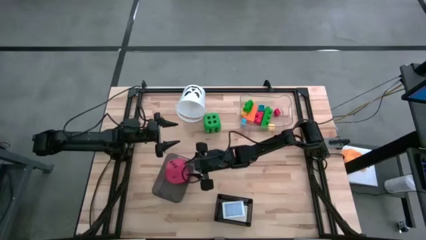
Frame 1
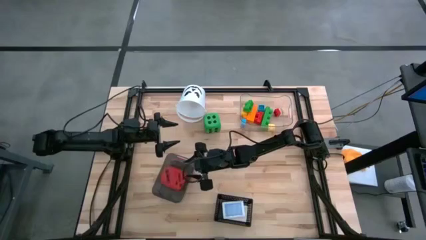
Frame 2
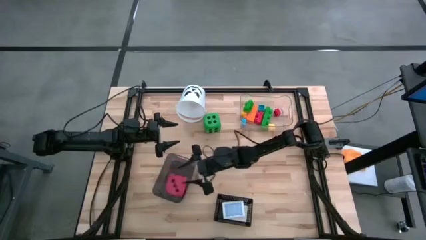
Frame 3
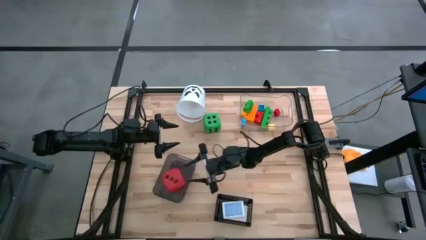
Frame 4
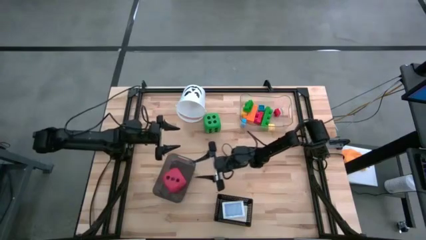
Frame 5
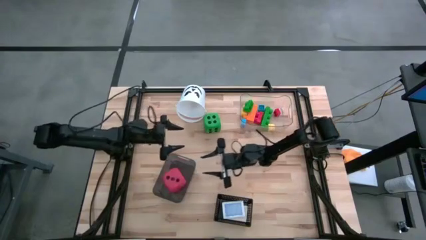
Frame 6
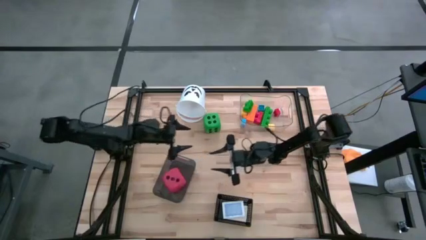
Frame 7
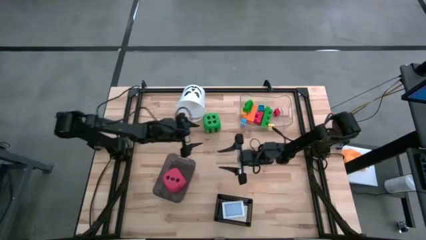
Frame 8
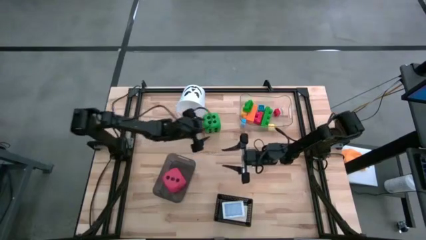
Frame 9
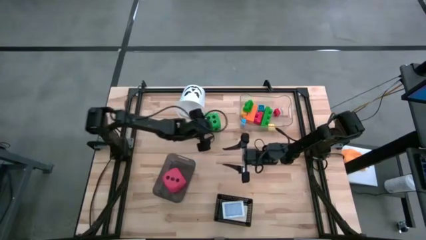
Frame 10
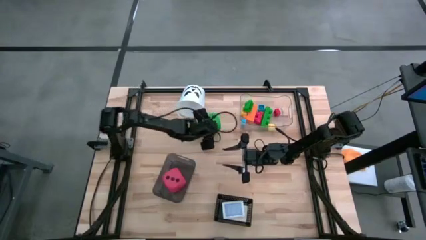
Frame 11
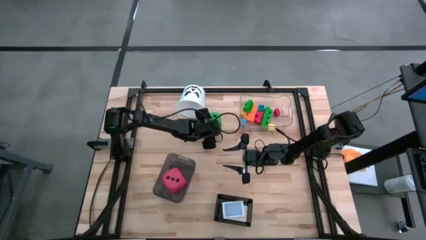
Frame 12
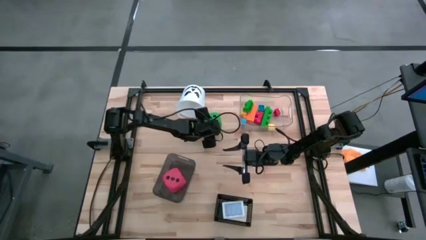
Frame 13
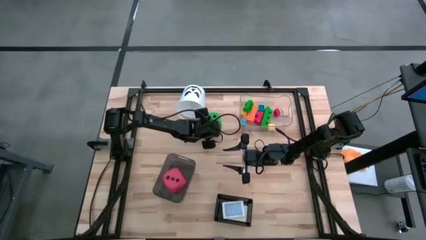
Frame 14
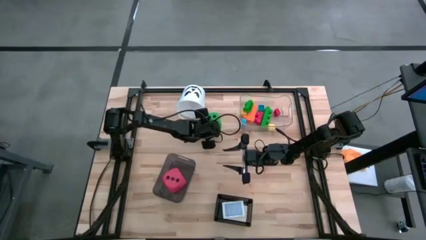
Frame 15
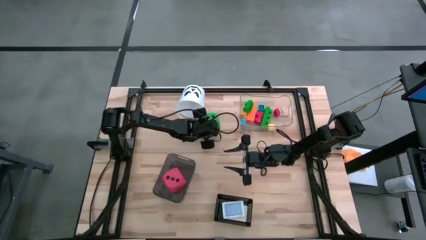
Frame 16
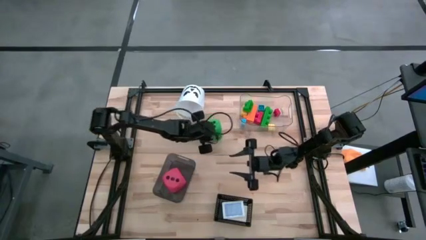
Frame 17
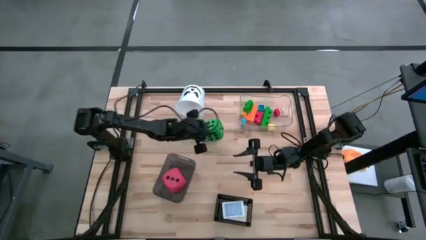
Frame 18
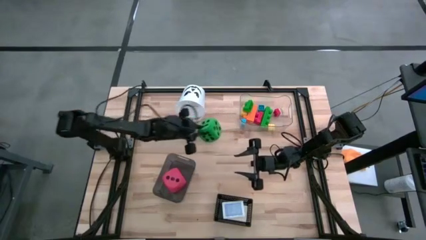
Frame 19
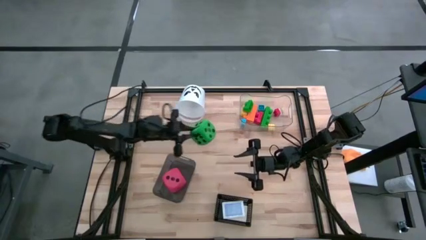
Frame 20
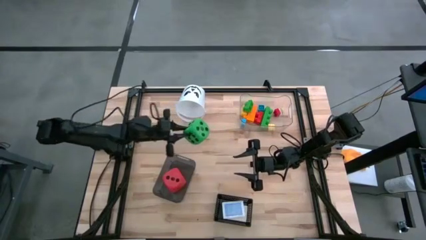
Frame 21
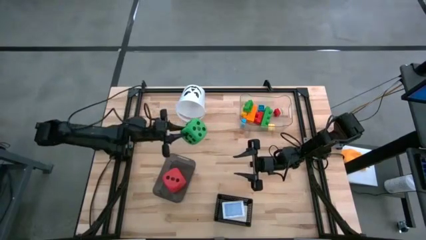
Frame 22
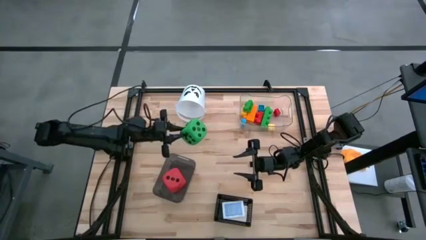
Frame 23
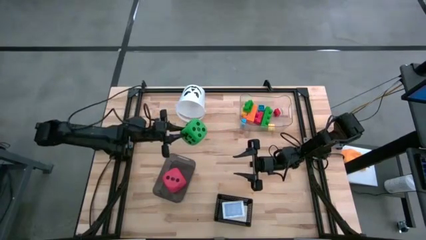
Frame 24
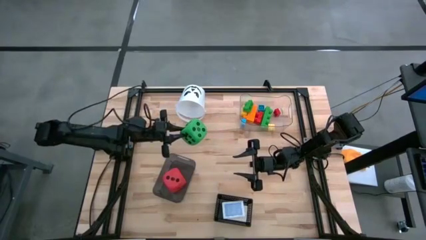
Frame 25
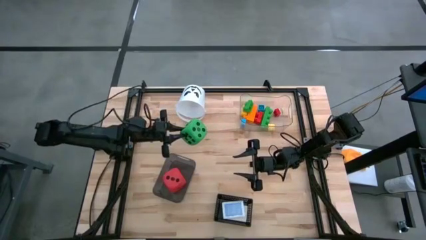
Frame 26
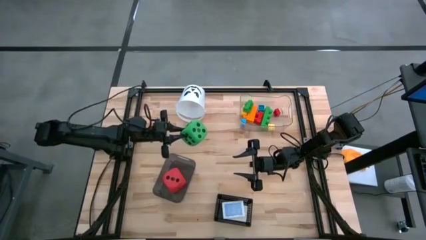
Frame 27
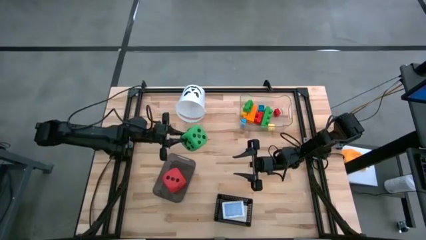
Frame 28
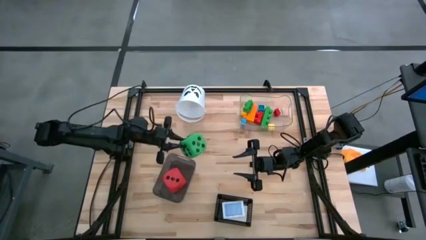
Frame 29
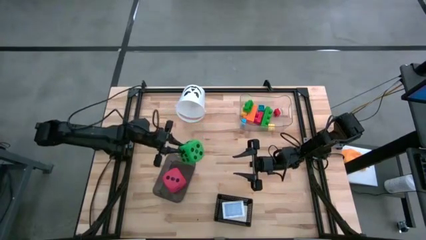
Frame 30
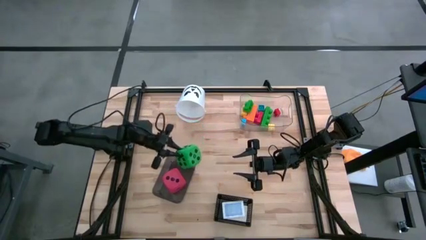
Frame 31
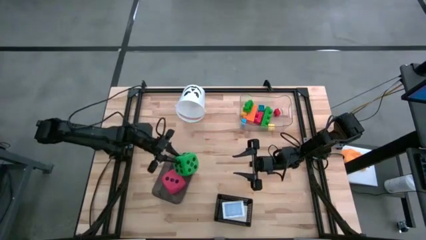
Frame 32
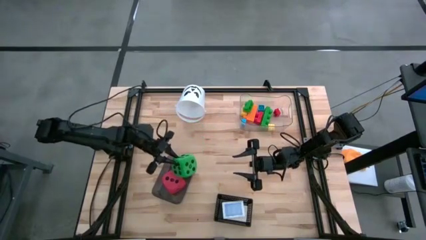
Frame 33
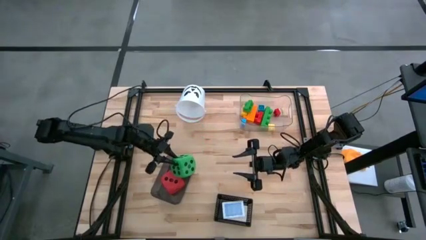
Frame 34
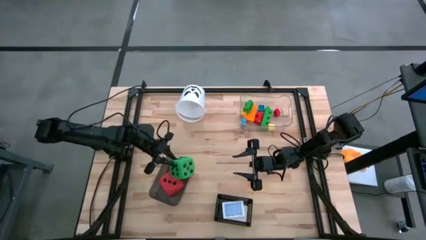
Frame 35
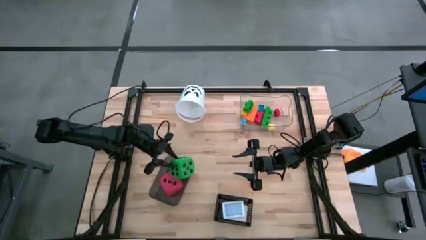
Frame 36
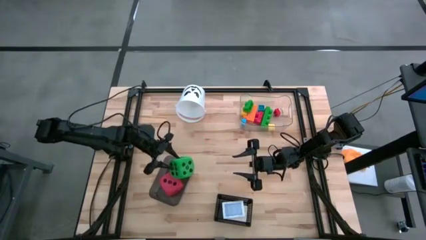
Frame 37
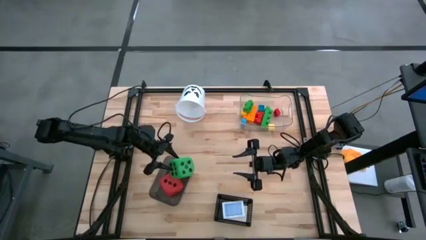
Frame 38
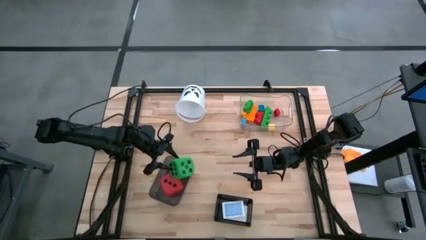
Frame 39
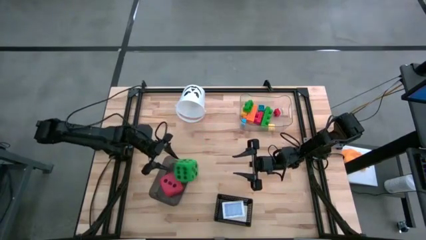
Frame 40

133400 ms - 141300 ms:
Task: Pick & Place Toys
Put the green die into the gray bin

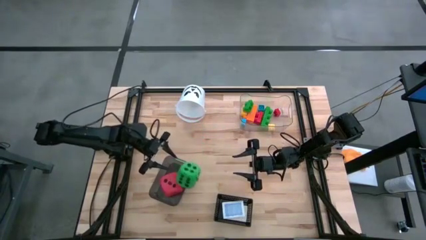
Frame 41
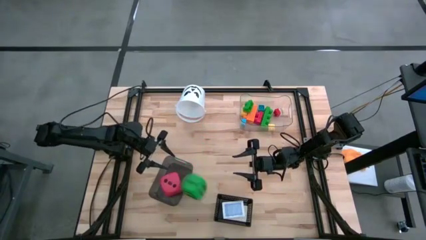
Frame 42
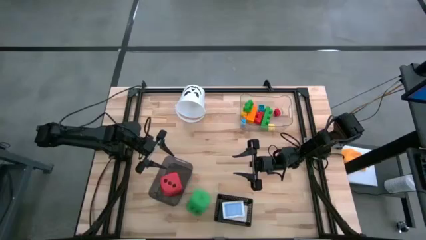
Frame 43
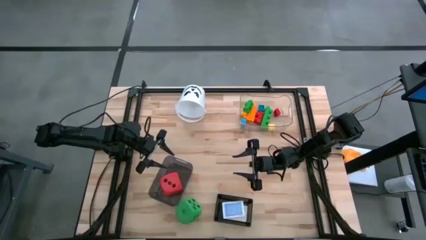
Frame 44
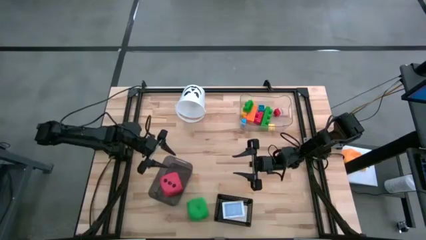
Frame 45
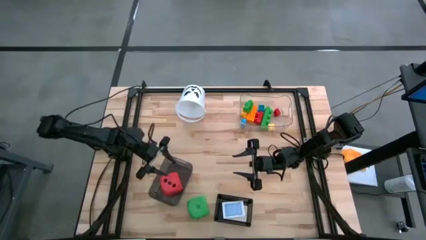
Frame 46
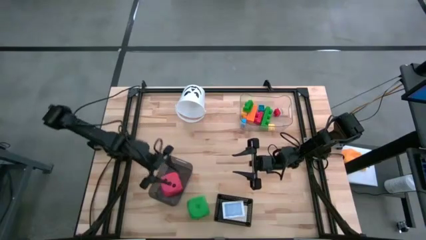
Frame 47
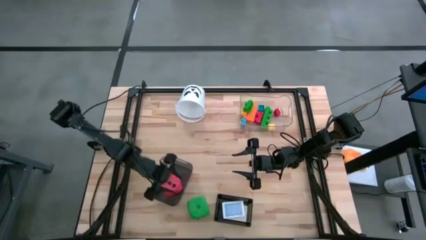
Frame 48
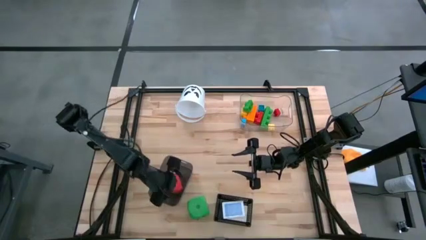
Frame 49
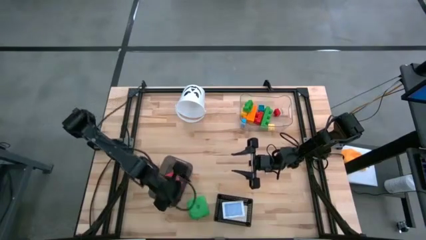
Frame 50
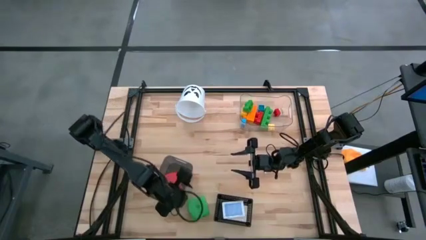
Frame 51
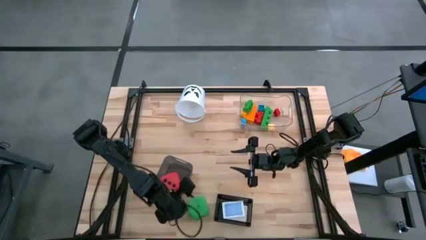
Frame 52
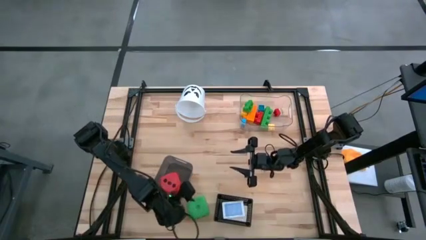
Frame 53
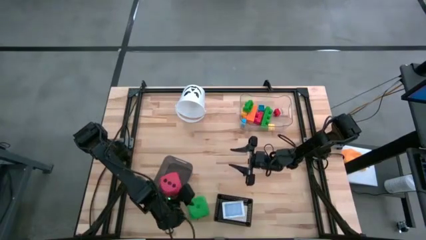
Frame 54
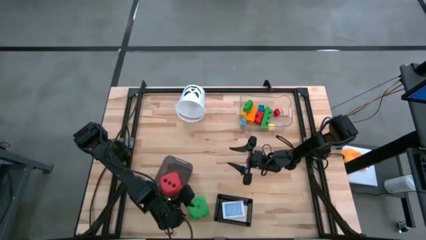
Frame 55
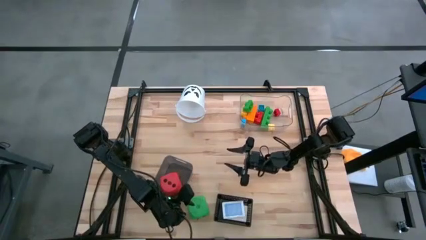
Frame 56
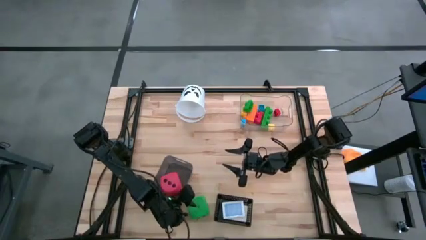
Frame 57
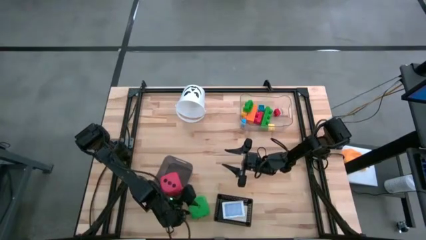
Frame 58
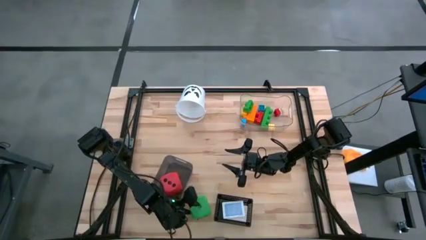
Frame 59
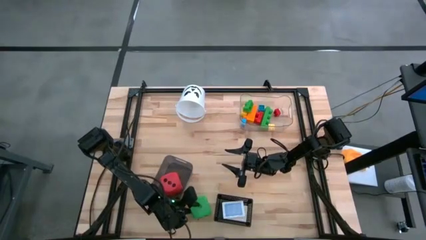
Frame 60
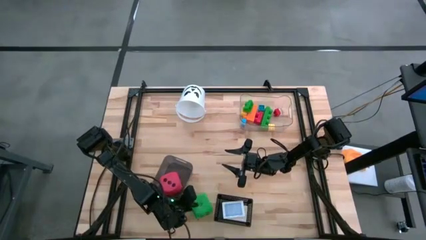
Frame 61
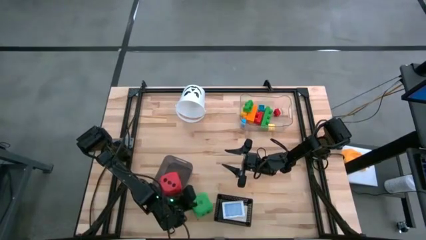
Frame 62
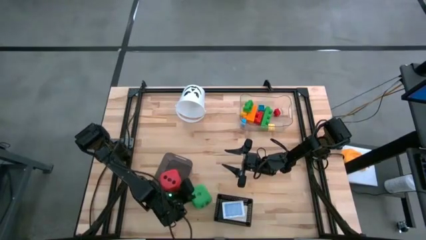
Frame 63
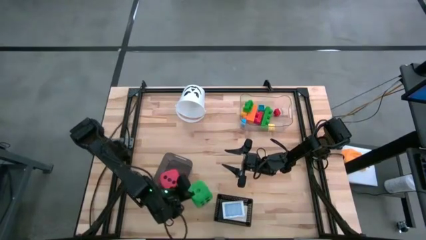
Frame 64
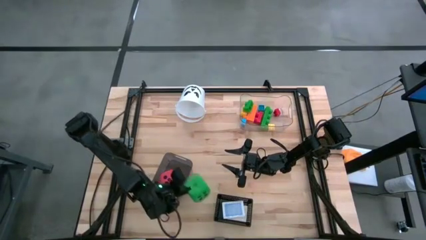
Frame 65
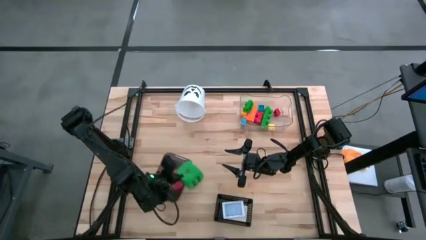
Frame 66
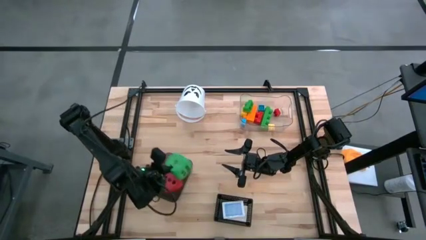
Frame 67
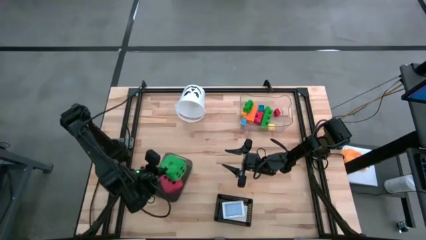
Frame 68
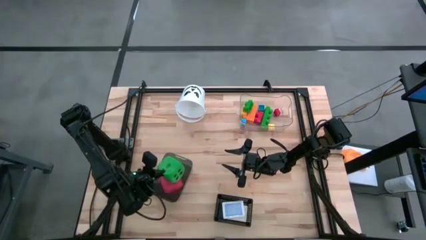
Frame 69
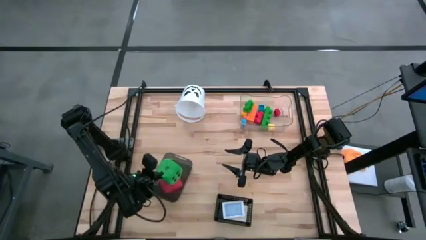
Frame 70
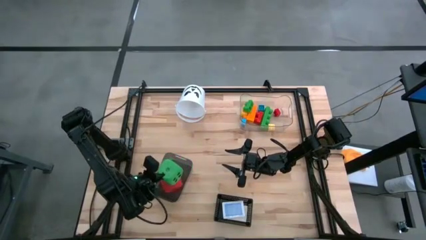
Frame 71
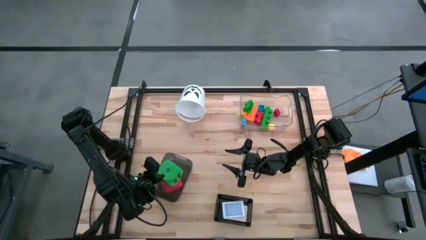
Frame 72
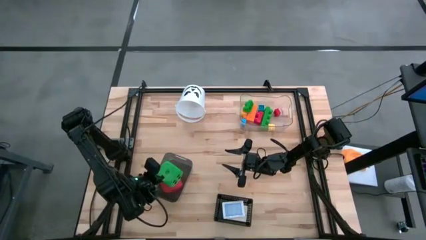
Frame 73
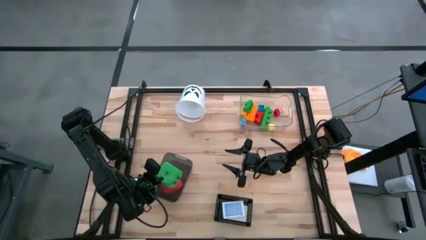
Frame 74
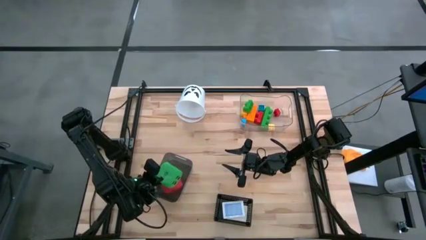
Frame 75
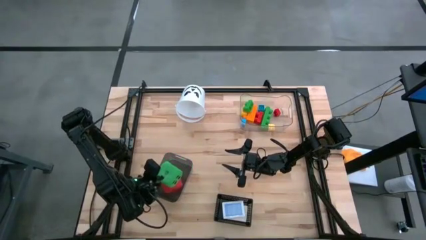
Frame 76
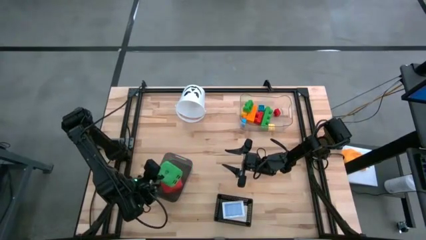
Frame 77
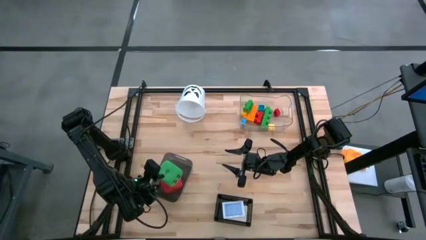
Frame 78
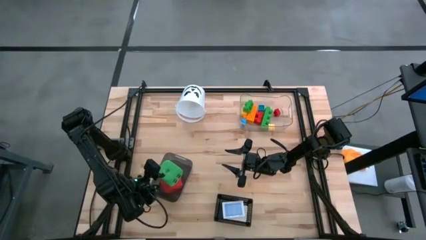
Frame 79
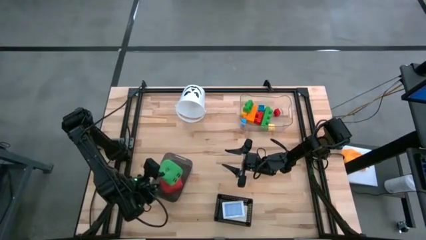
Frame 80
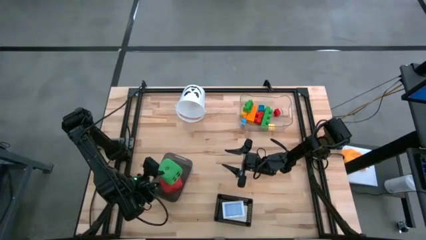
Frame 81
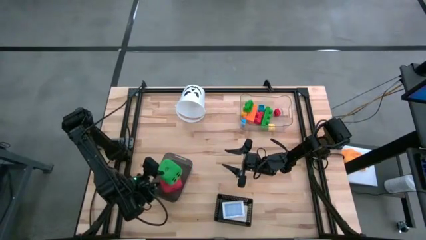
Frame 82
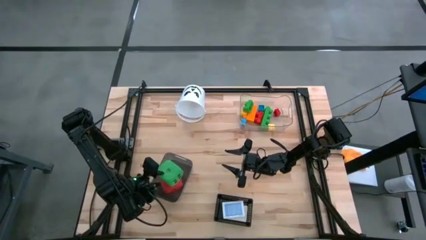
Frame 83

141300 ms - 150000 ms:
Put the green die into the gray bin
